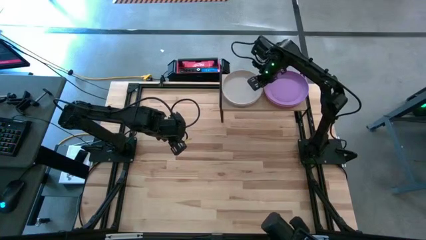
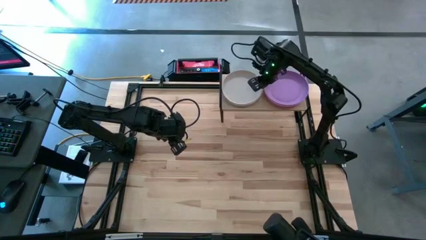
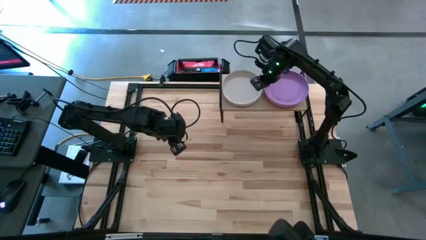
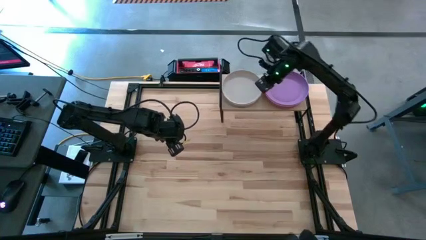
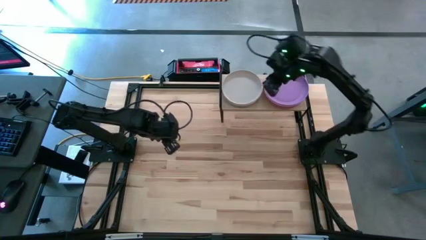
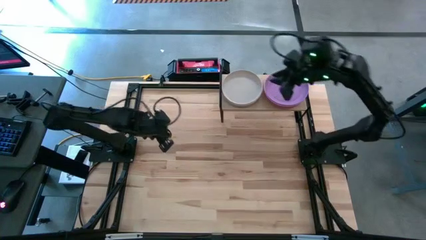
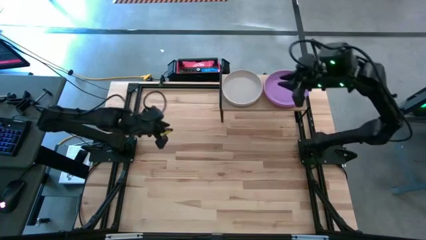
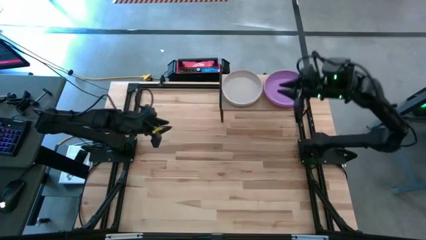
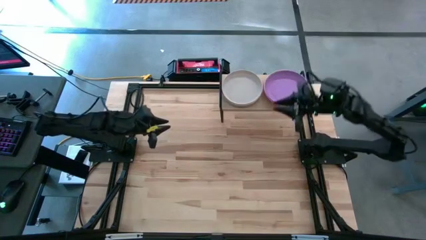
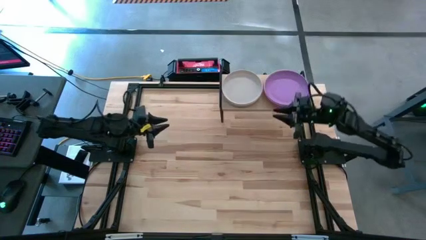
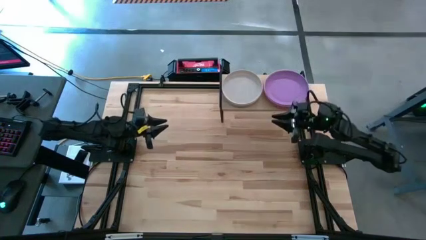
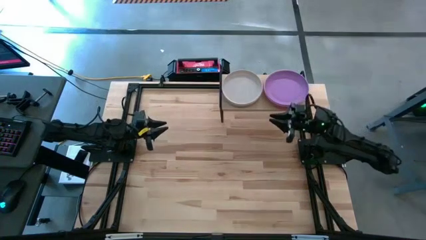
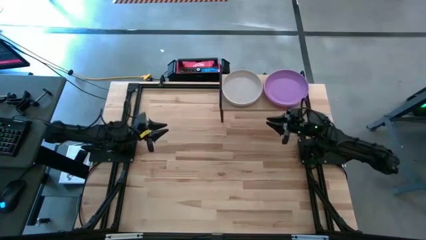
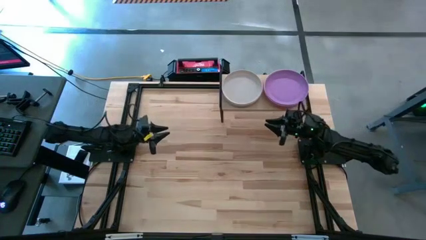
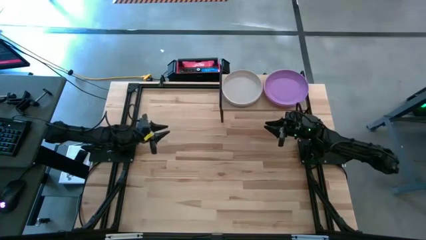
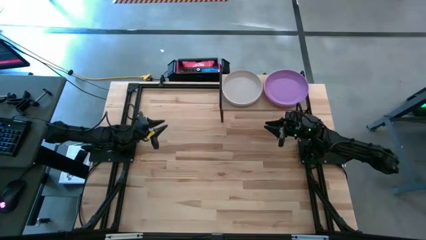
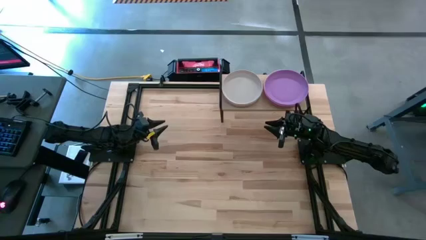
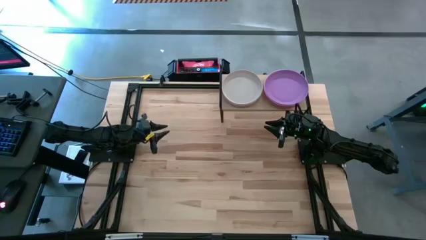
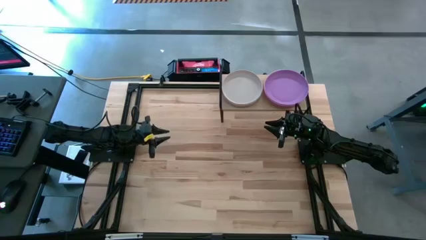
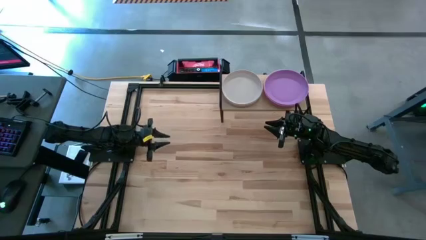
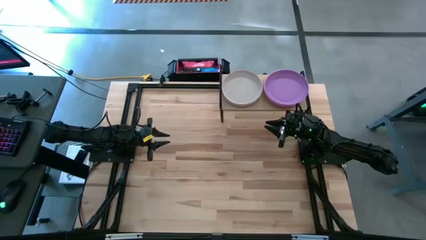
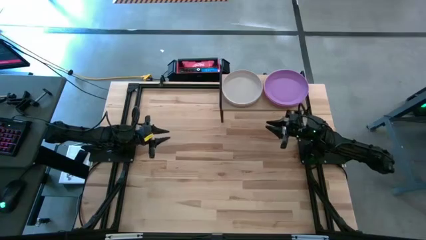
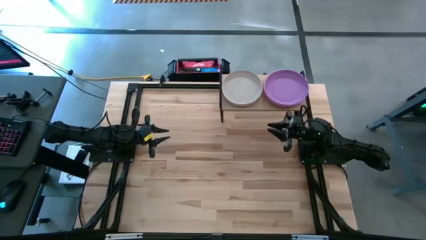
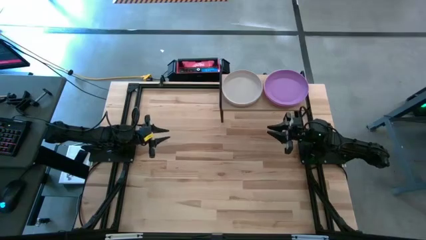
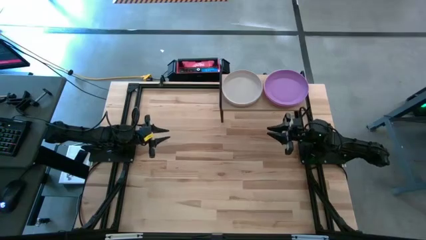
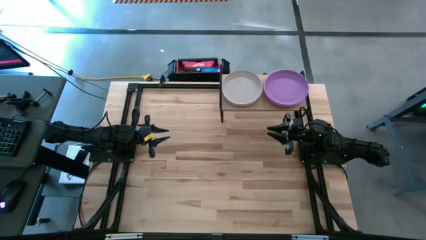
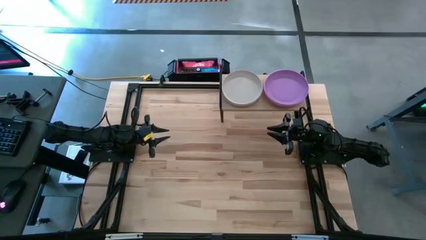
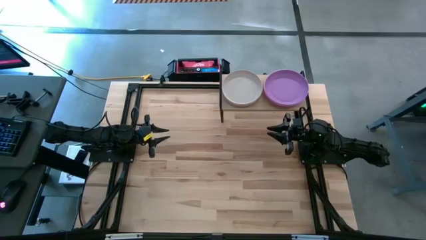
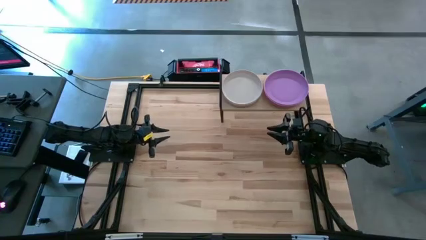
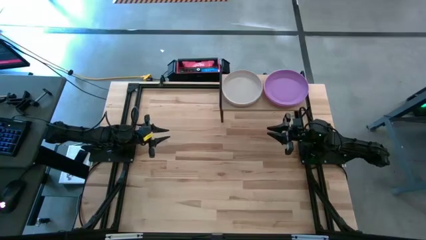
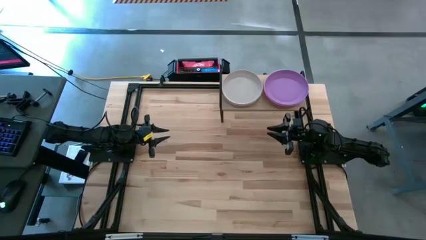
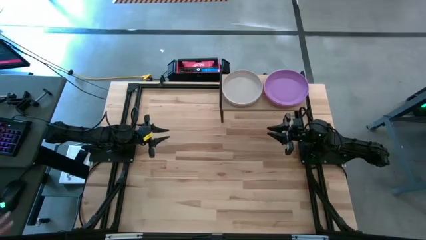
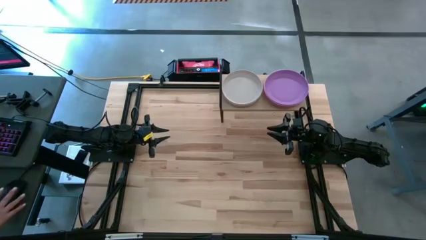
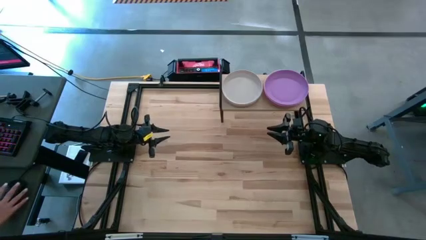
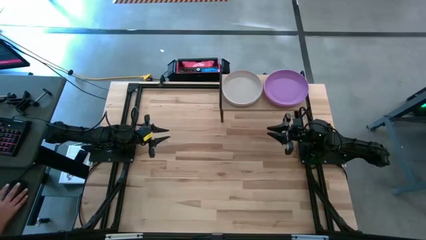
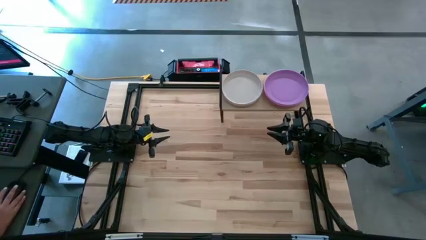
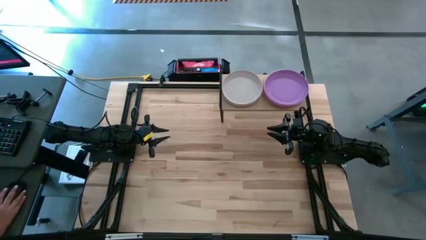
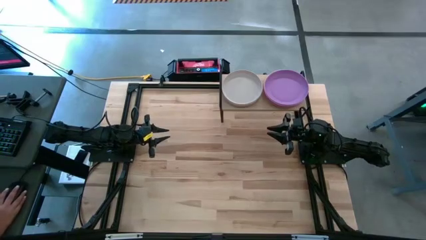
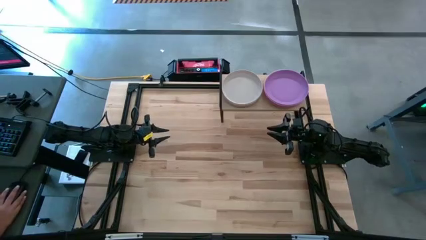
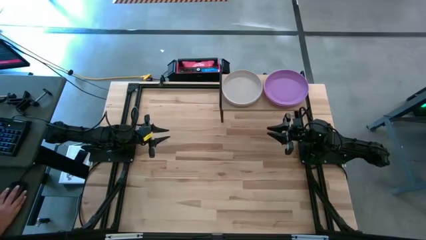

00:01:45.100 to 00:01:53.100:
Task: Place and stack plates onto a shelf
Return to Home Position

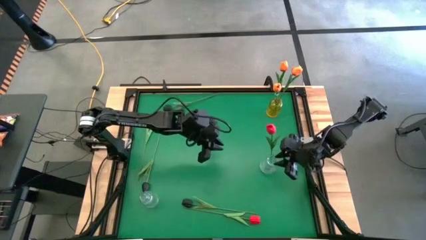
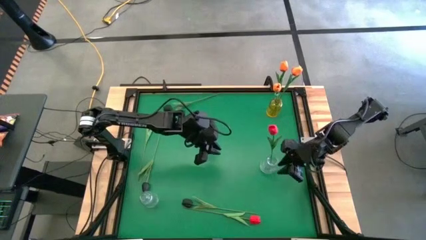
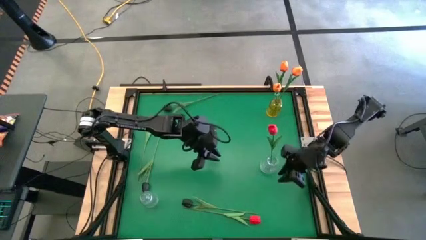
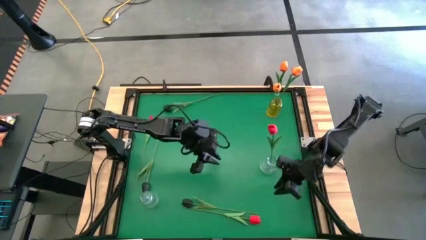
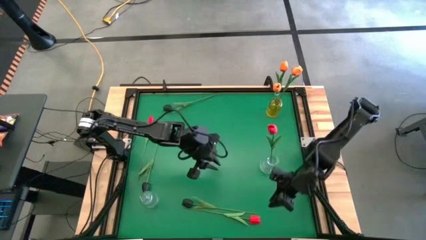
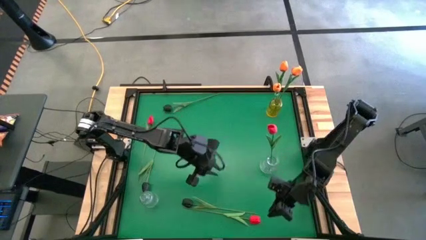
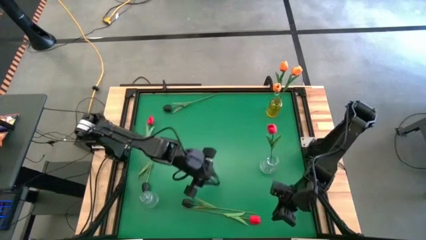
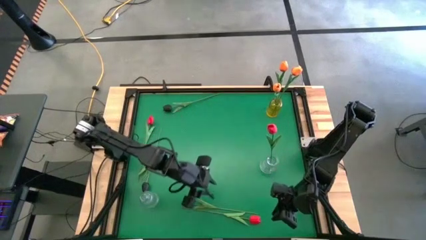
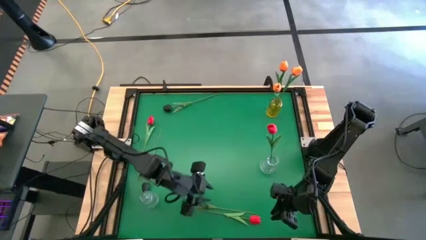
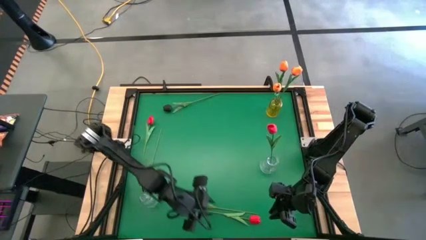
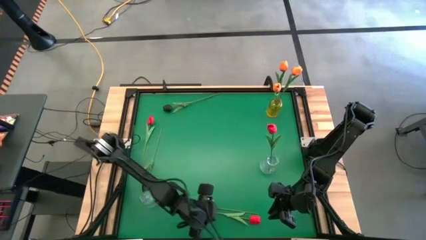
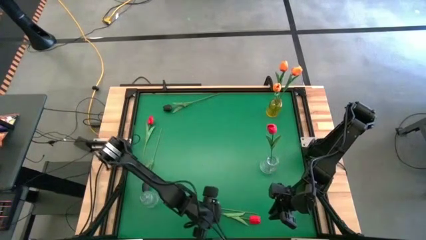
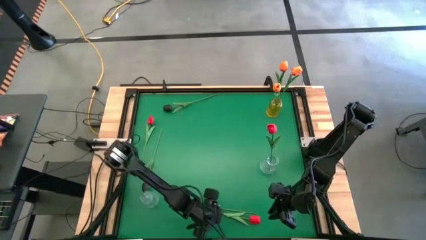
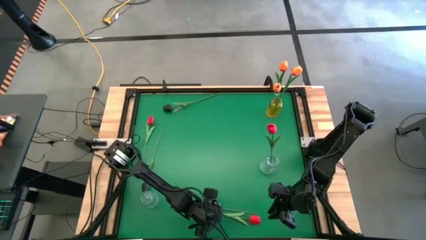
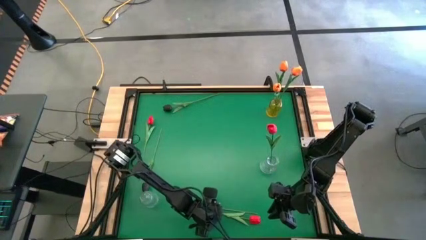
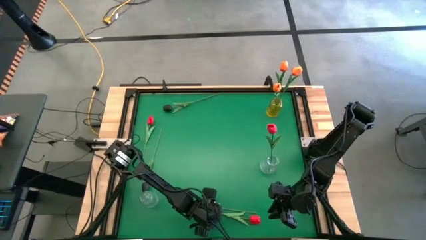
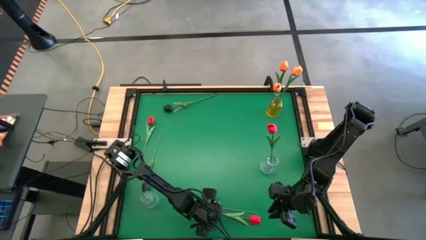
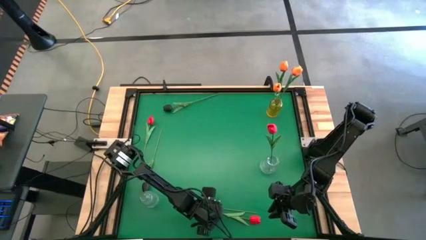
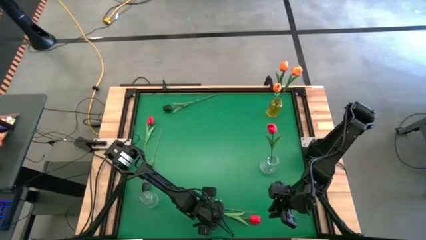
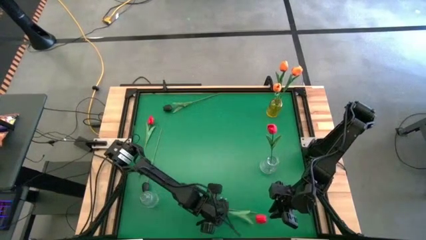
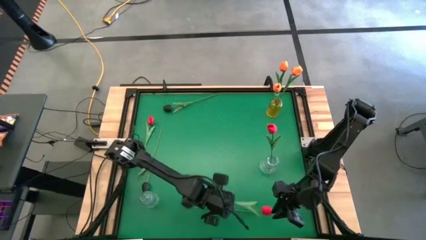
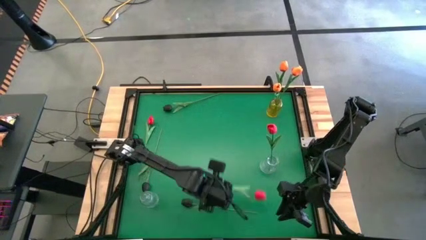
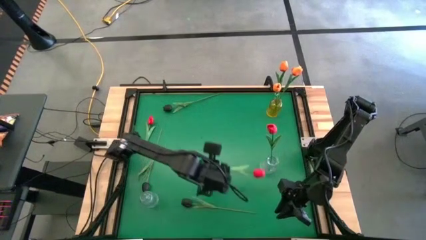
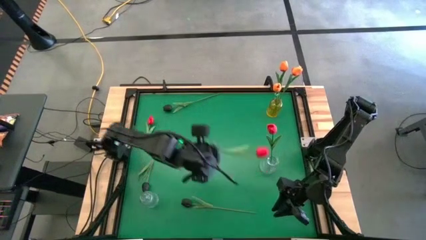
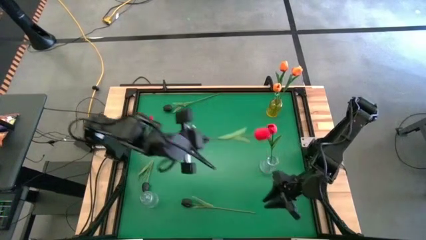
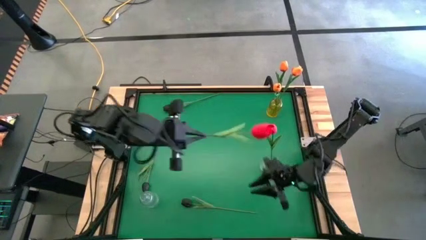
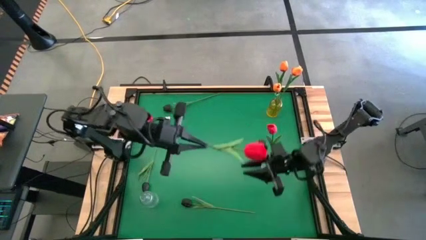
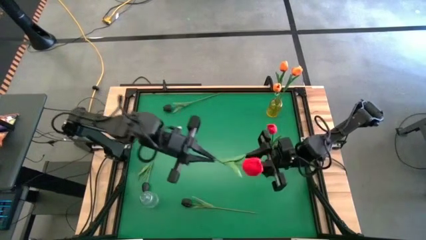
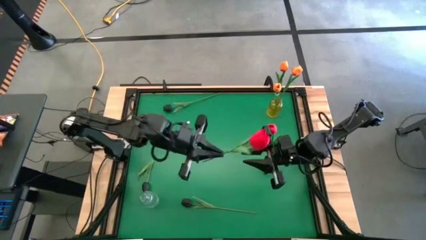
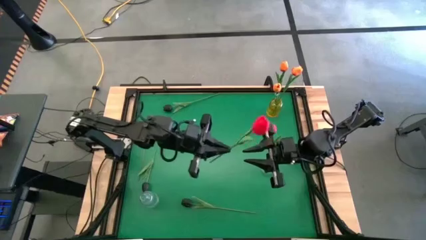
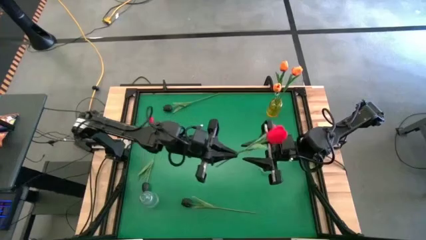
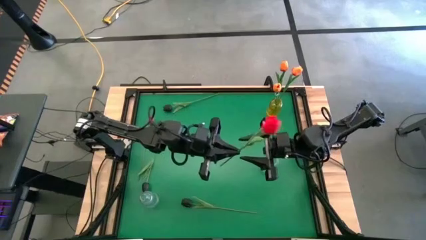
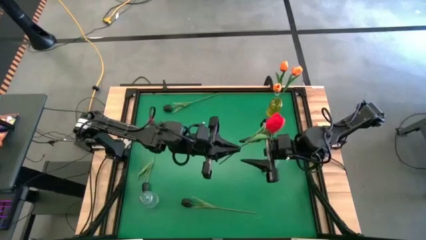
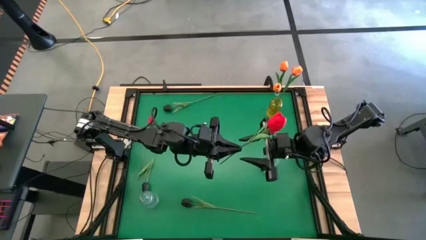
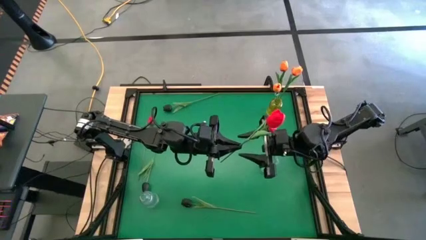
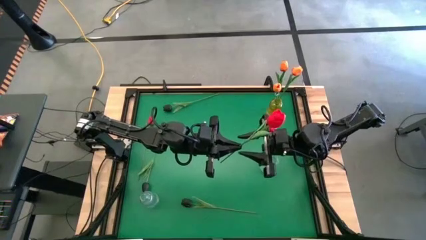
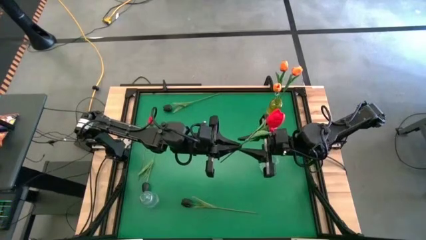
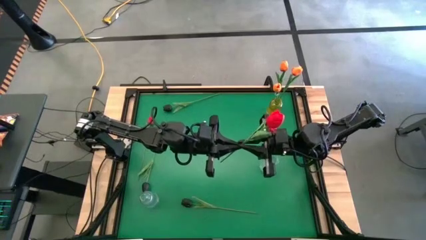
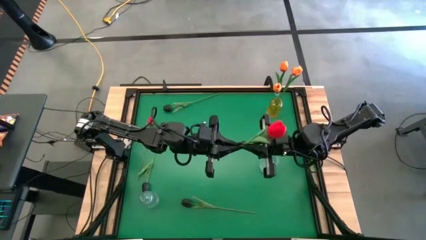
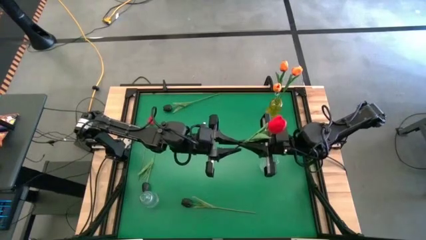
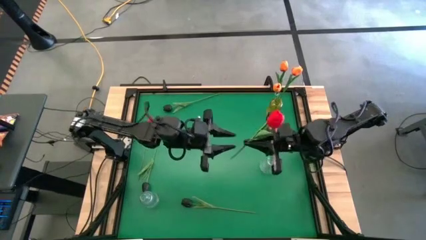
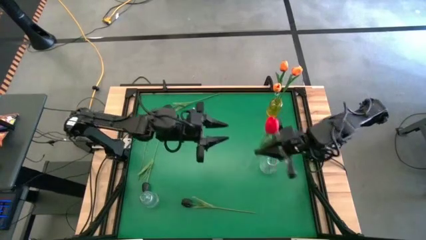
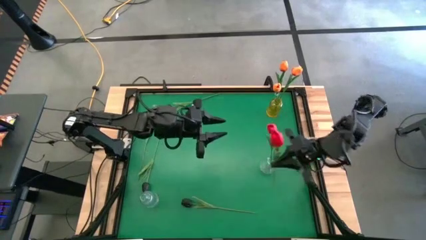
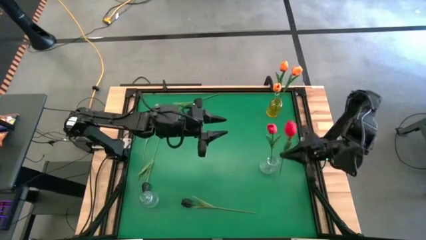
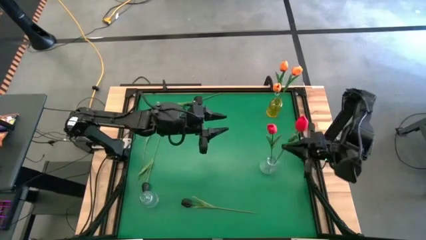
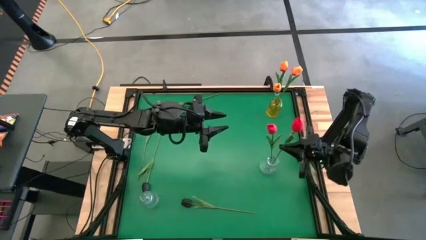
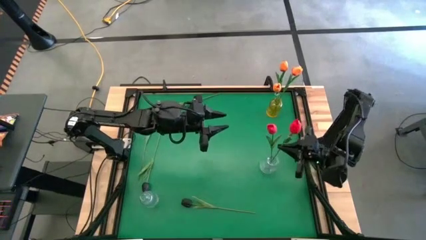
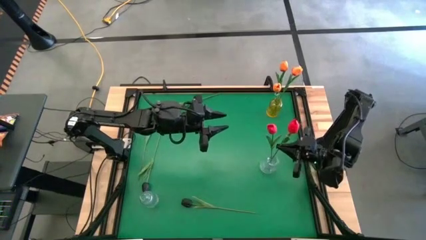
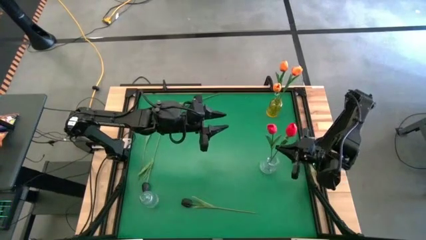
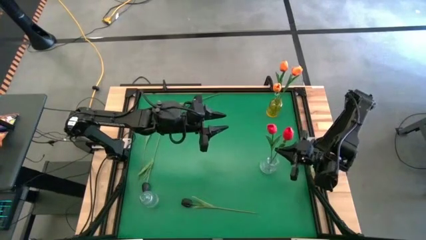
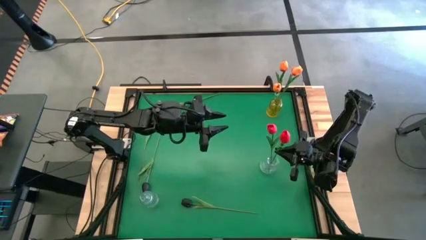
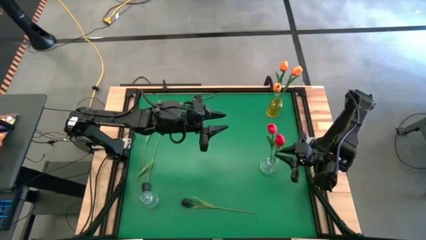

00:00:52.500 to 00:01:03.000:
Task: Sort flowers into vase by color
Put the bottom red tulip into the top transparent flower vase
